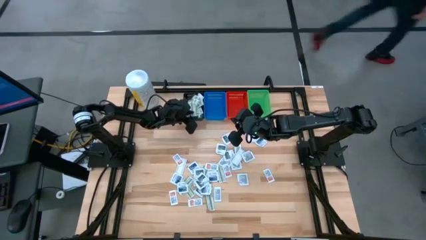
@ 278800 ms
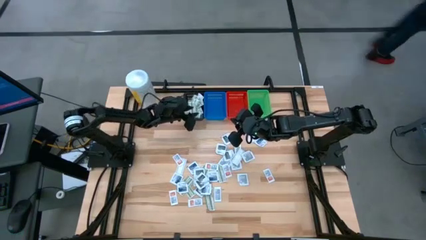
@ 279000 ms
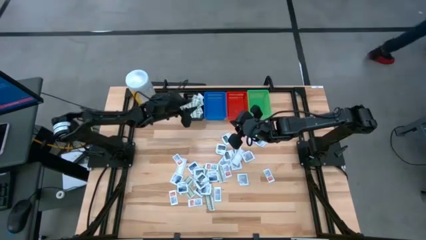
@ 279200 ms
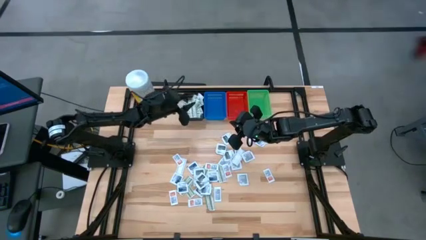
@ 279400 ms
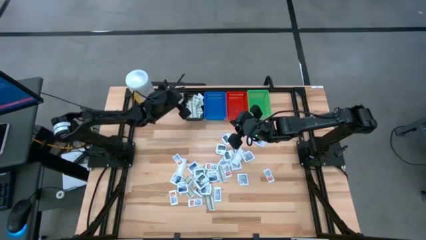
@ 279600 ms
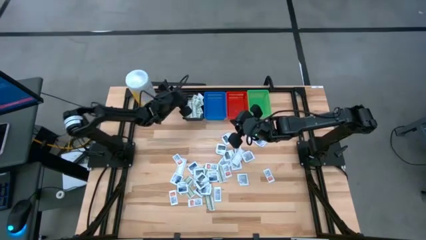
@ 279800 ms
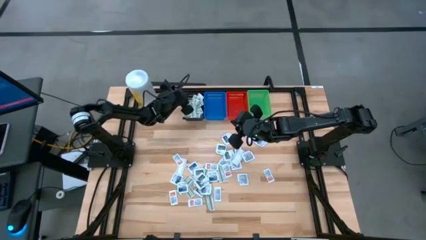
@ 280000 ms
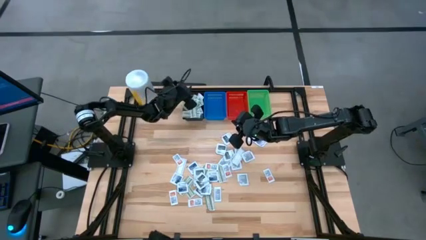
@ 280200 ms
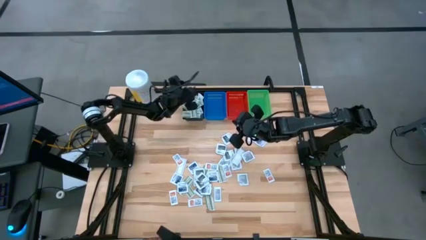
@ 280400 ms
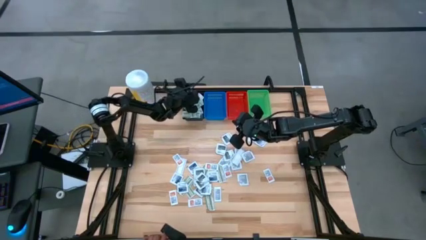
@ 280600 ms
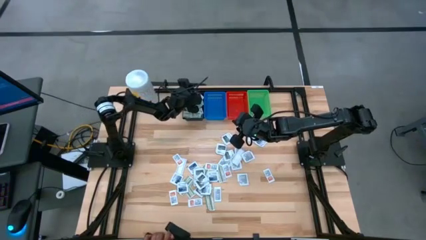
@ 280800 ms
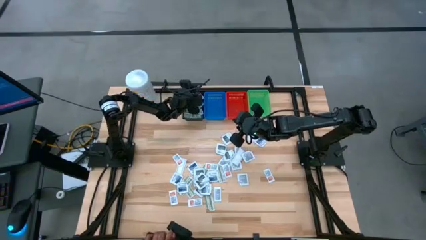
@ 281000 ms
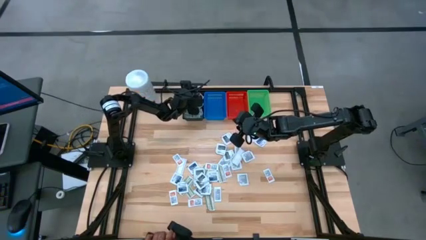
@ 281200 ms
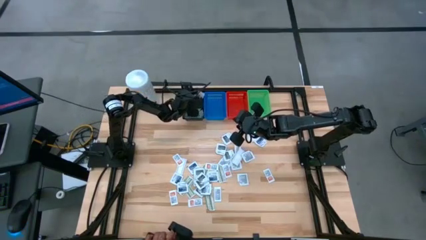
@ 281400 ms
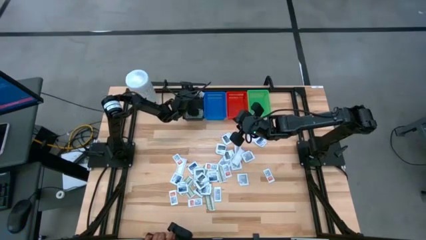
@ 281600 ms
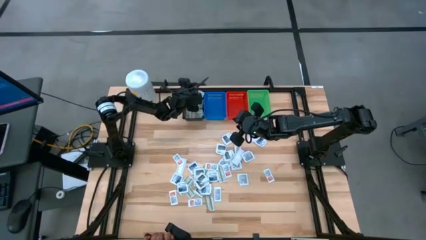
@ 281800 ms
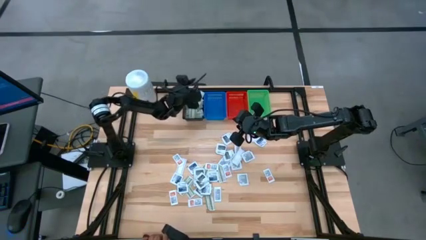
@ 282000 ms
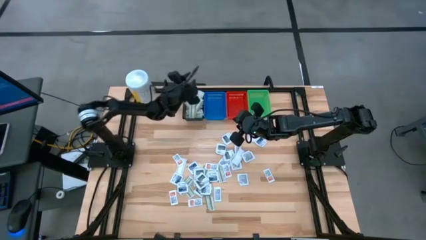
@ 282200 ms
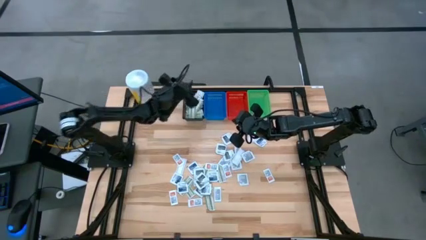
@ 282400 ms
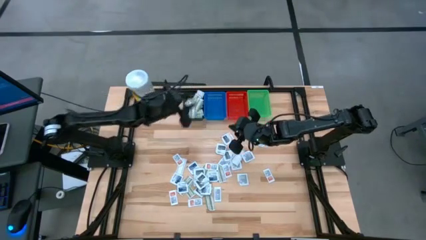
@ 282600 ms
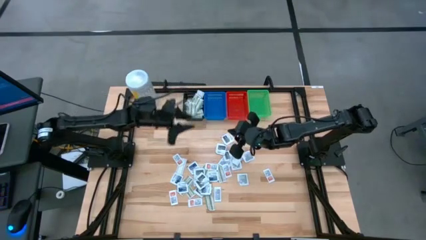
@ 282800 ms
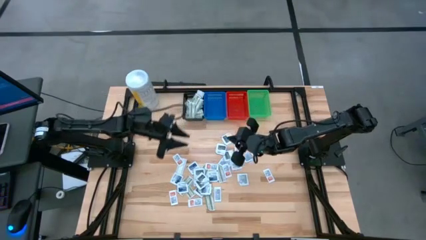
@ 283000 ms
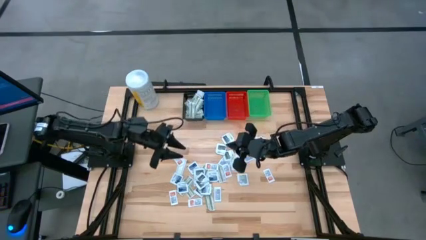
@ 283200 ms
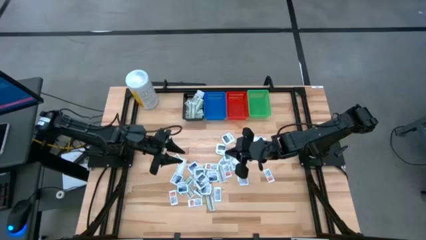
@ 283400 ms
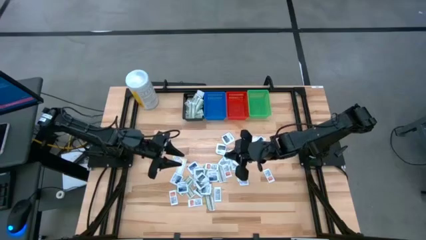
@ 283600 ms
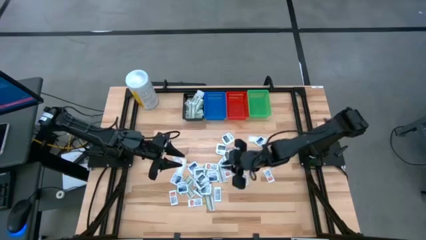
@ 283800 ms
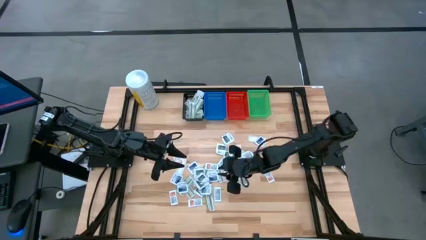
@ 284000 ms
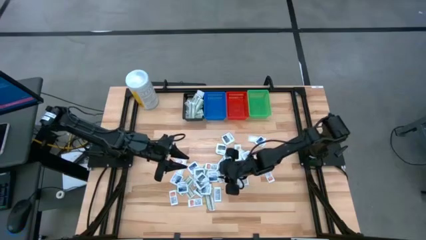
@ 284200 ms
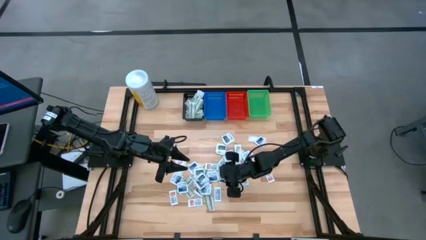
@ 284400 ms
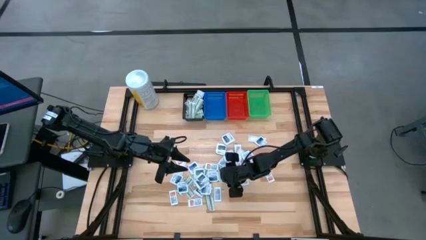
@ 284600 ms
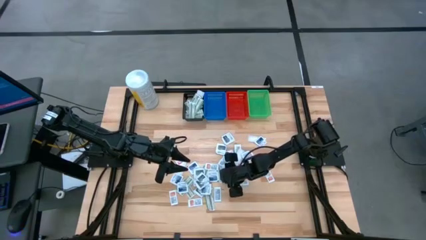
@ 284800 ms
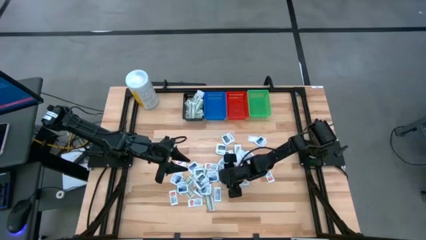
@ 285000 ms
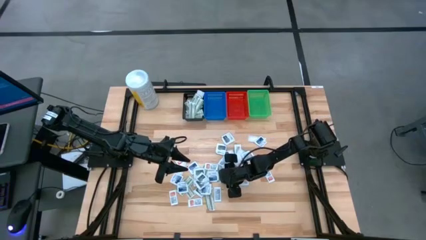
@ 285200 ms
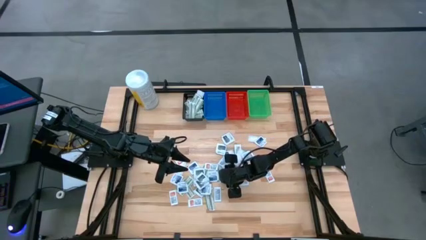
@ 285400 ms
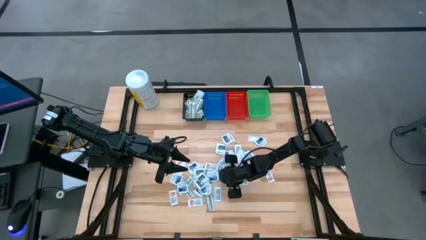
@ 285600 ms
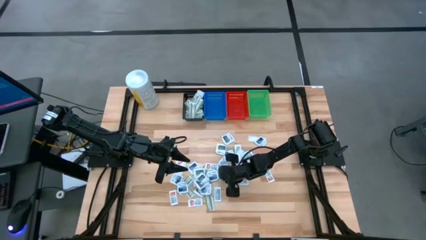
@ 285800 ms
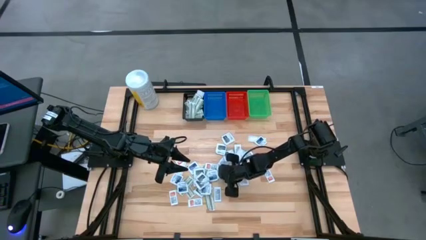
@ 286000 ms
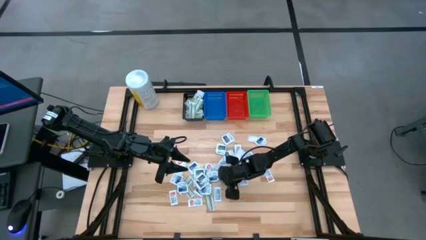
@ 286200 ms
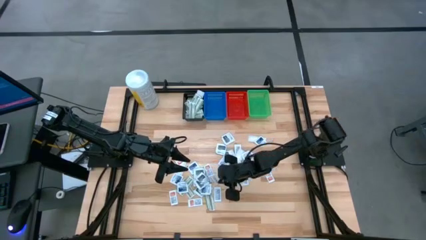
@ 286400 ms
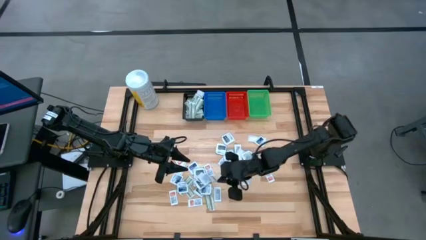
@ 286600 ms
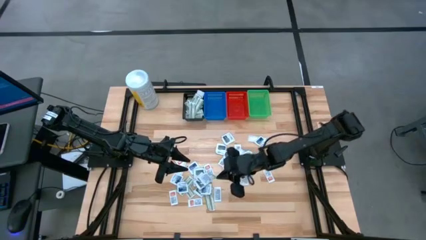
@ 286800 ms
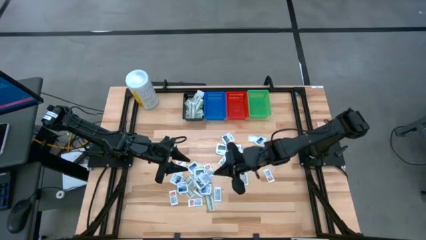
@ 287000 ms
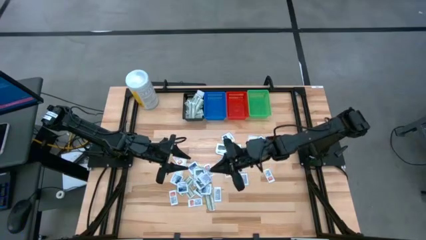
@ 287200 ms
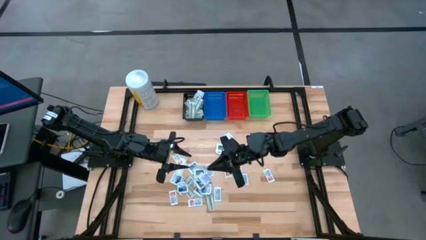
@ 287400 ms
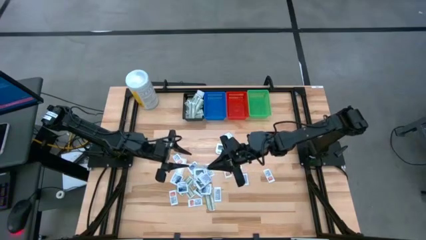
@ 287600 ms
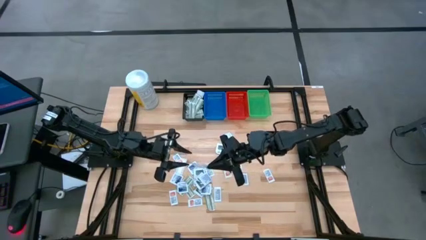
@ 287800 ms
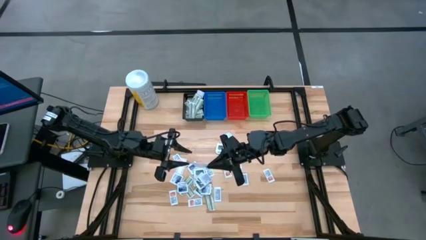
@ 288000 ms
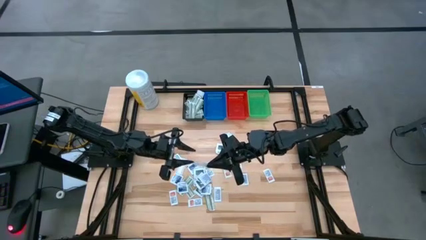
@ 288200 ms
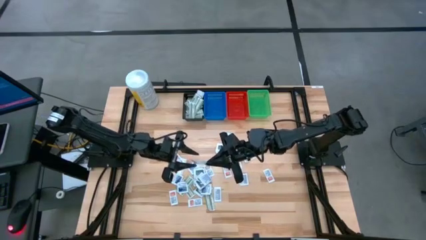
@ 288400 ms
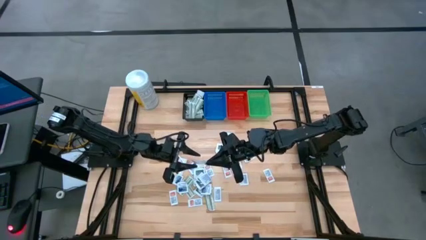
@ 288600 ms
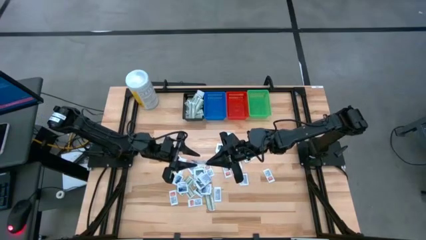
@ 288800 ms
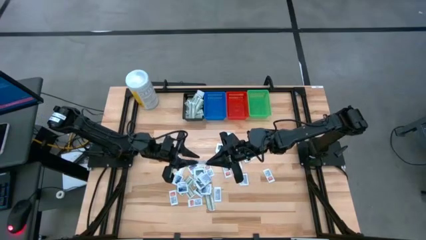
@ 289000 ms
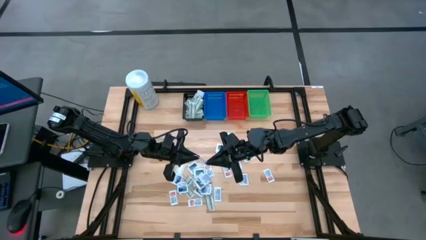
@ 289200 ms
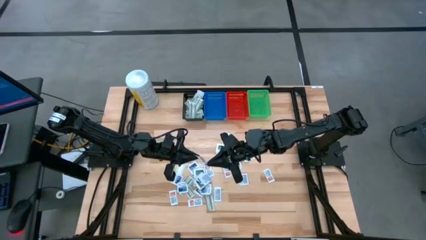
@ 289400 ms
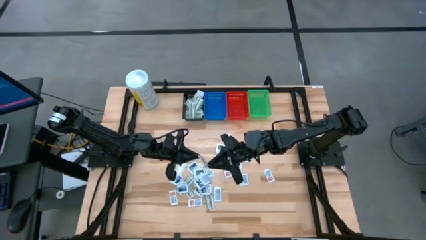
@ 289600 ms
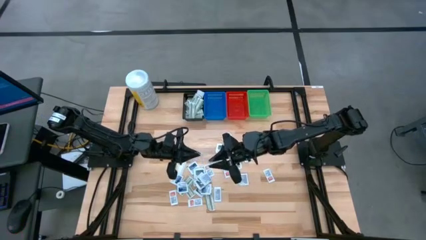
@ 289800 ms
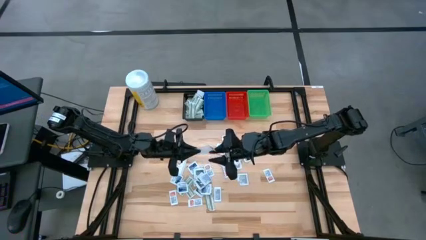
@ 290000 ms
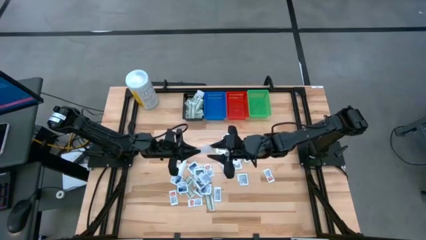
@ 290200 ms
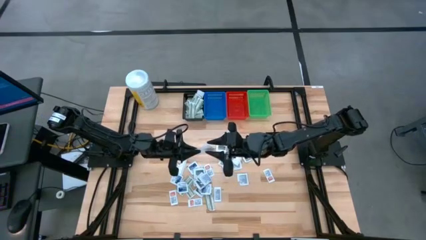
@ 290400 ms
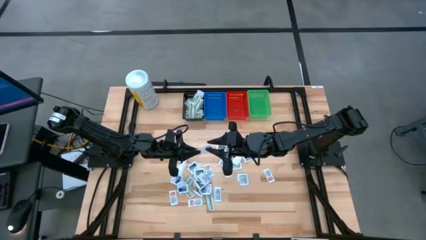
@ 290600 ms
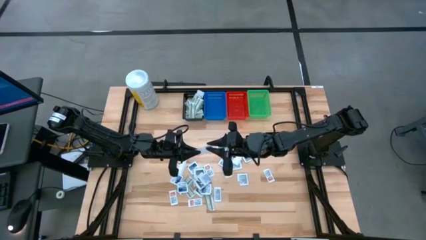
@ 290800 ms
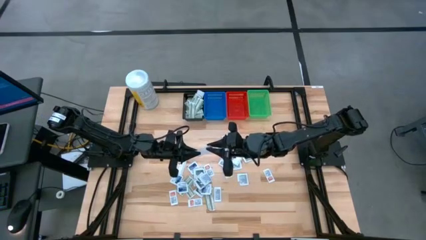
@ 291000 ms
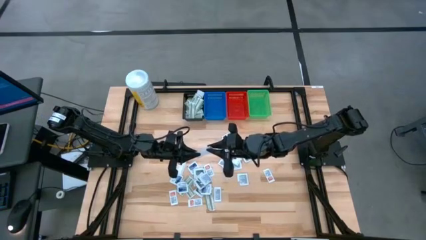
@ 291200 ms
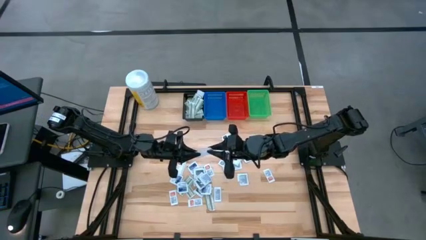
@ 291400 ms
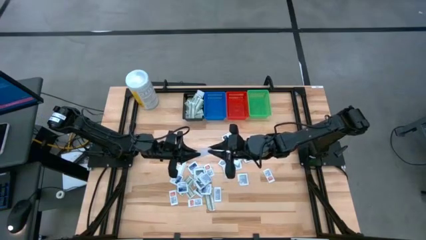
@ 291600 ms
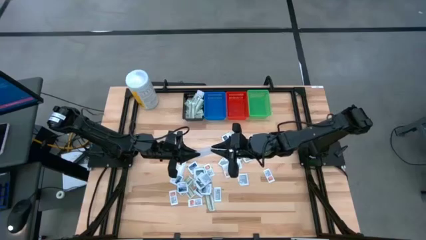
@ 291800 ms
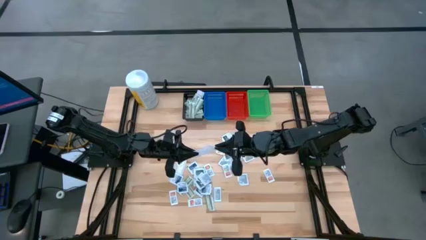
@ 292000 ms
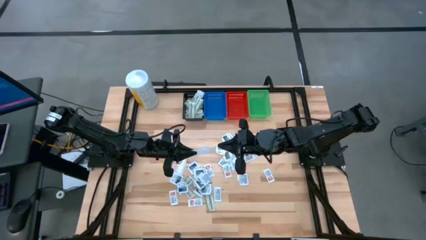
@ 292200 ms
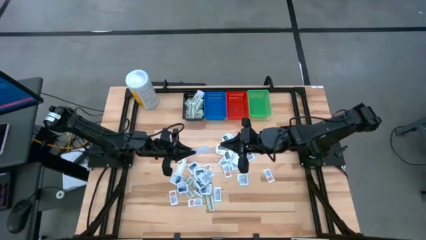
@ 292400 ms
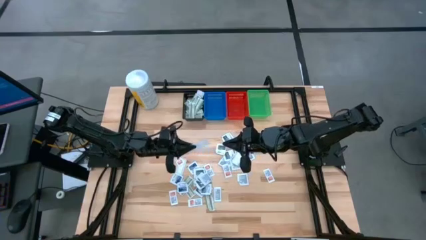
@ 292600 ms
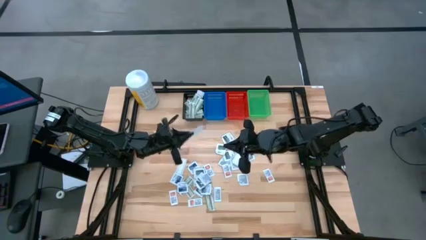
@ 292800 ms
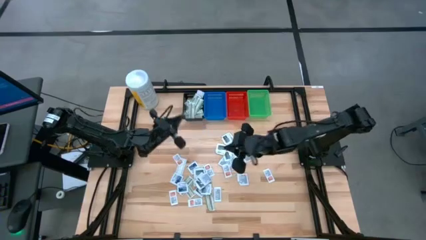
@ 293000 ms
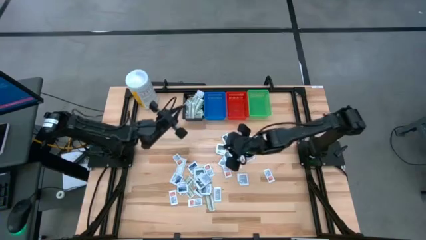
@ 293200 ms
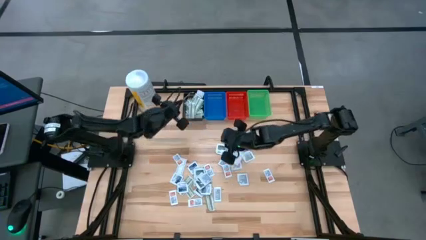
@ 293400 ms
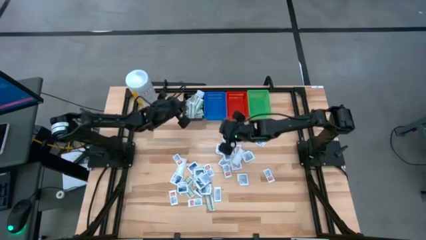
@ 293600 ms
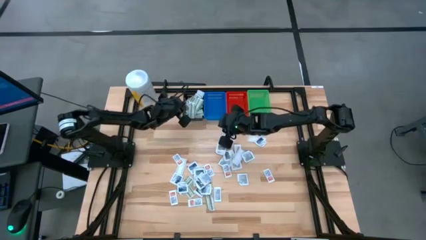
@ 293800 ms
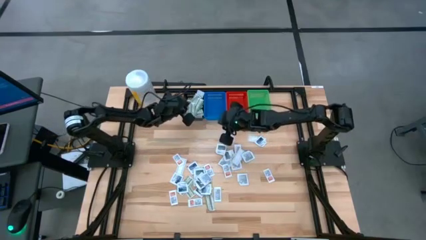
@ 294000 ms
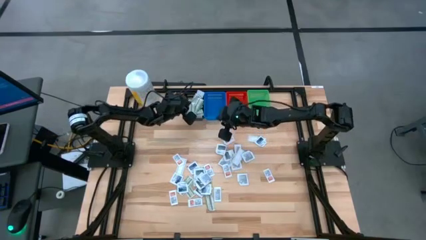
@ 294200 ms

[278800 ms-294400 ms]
Task: Pick & Place First Aid Supplies
Put the green bandage pack in the black bin
